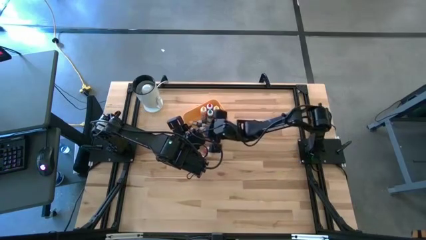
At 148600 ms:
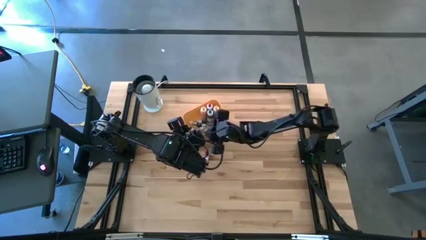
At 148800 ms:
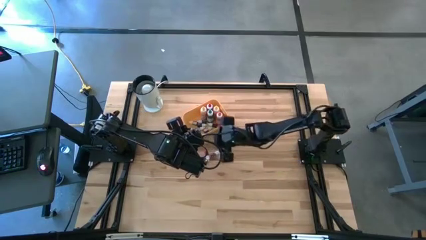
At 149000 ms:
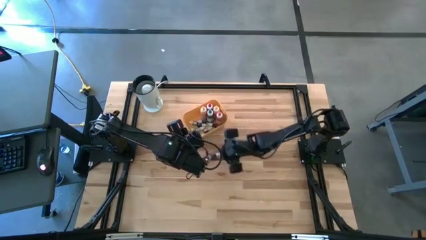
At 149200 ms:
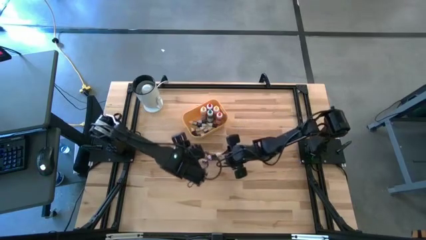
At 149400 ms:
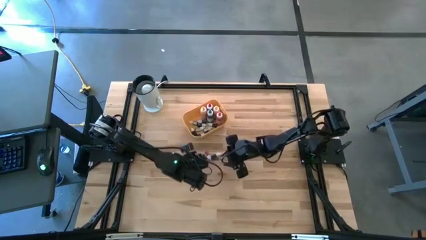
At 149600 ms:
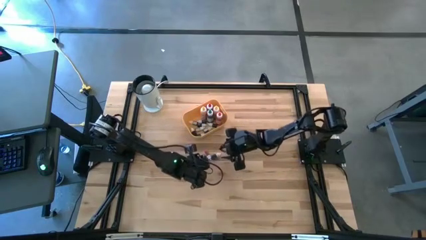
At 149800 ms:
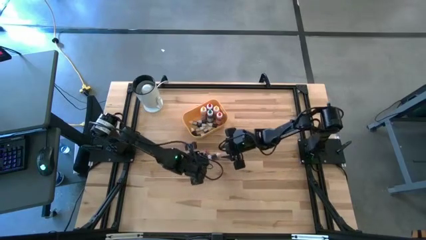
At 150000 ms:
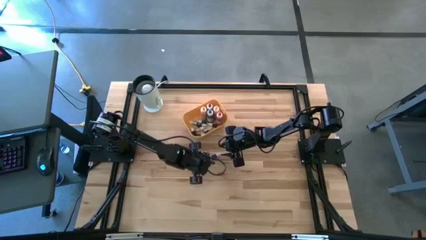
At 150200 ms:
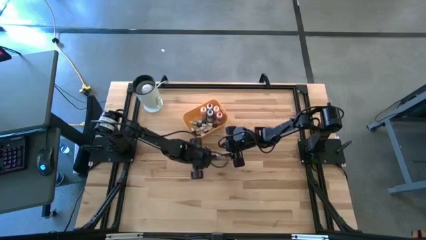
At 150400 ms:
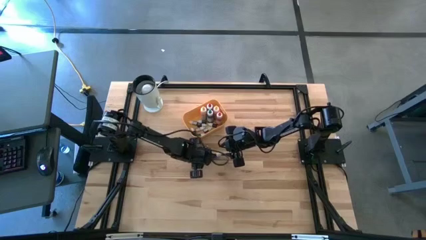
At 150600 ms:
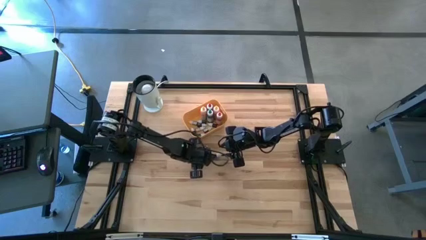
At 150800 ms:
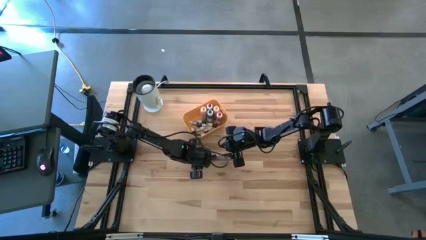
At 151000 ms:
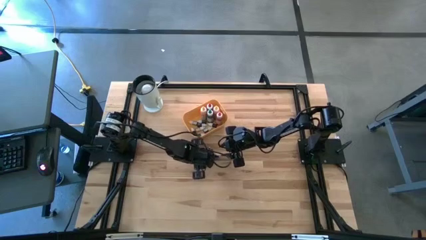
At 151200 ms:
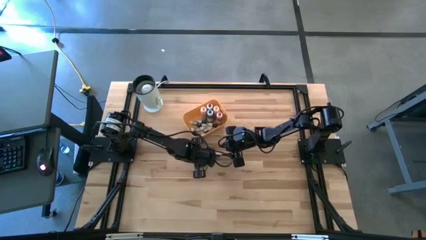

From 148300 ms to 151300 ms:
Task: Pick & Place food coloring
Put the small red food coloring bottle into the yellow bin

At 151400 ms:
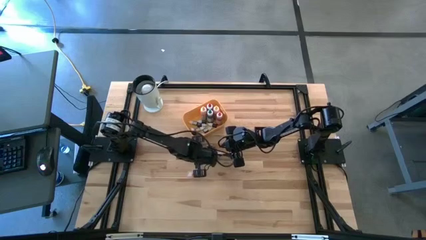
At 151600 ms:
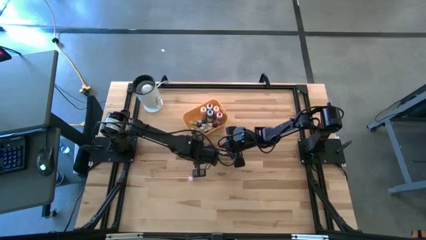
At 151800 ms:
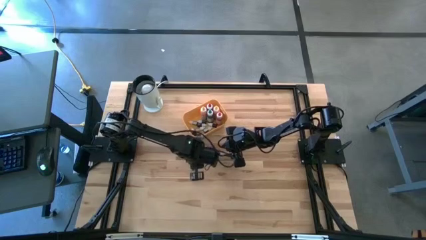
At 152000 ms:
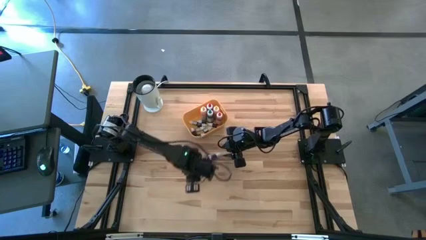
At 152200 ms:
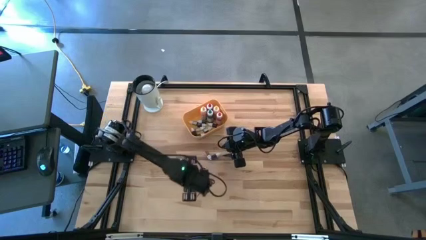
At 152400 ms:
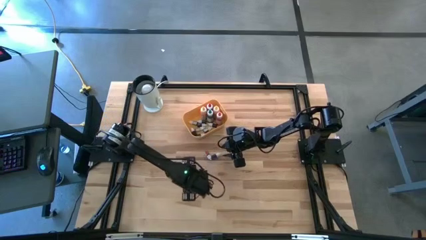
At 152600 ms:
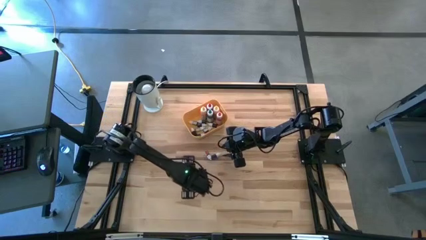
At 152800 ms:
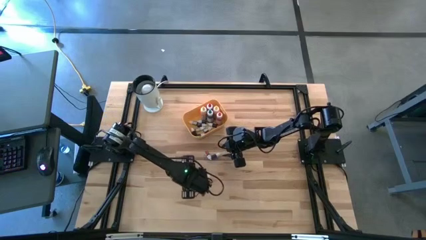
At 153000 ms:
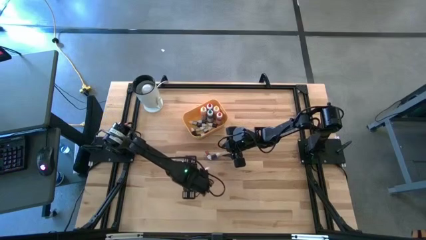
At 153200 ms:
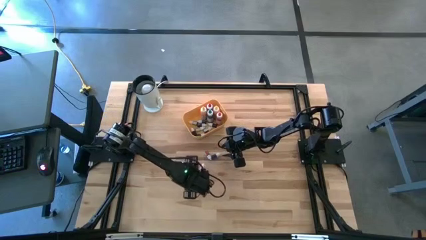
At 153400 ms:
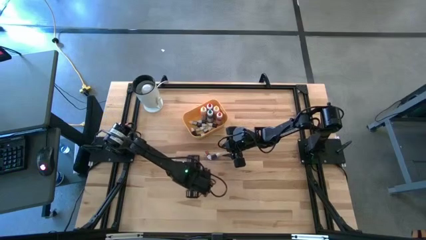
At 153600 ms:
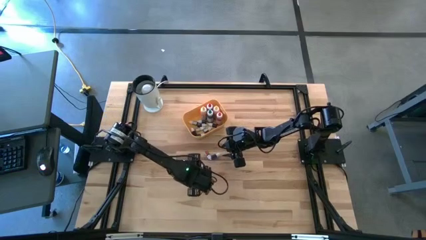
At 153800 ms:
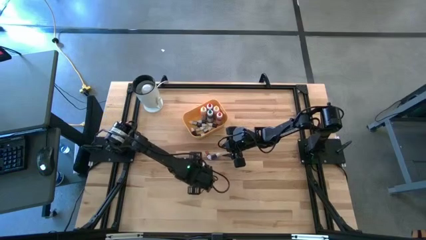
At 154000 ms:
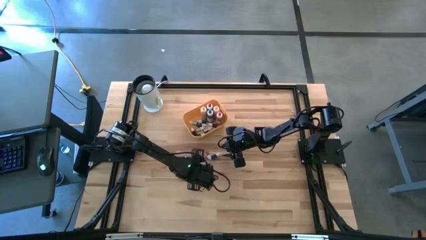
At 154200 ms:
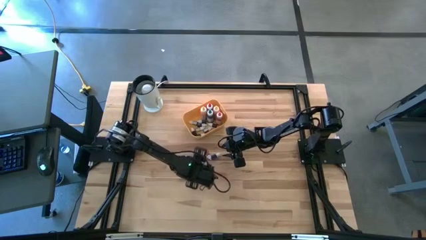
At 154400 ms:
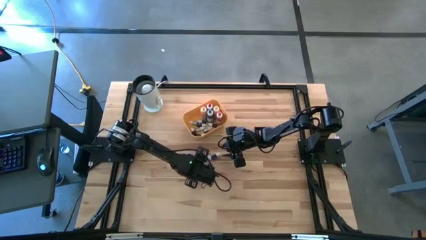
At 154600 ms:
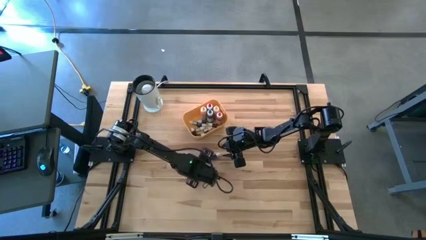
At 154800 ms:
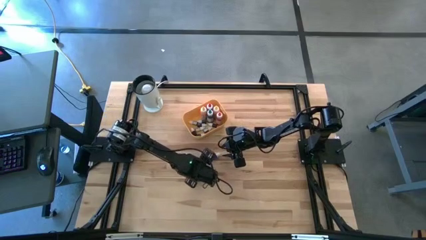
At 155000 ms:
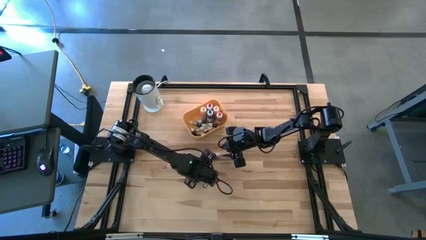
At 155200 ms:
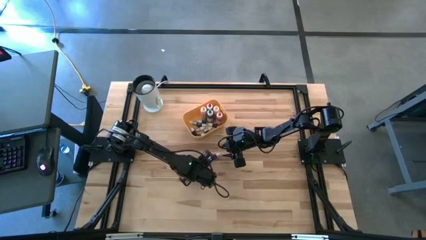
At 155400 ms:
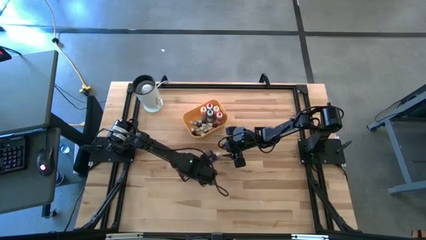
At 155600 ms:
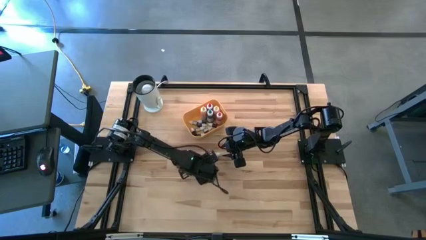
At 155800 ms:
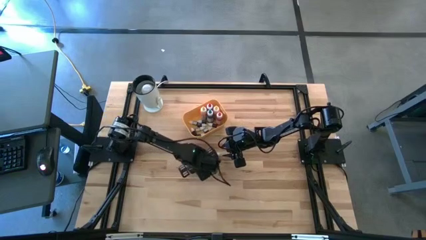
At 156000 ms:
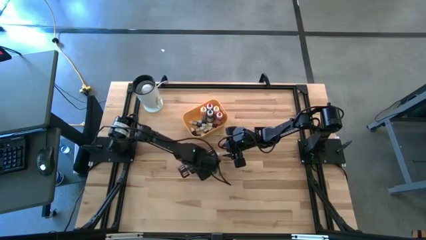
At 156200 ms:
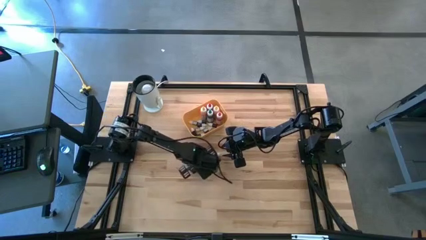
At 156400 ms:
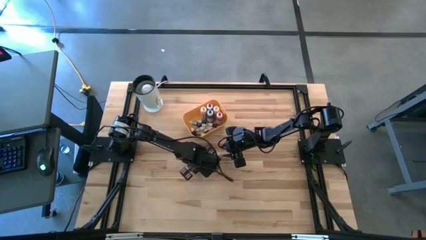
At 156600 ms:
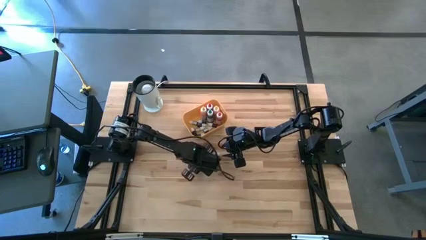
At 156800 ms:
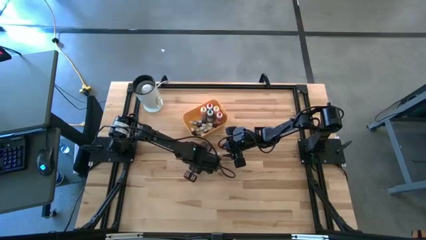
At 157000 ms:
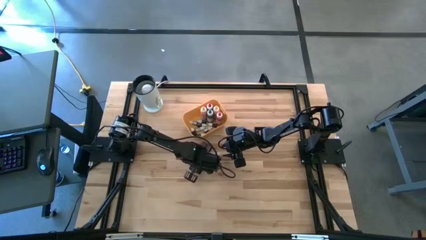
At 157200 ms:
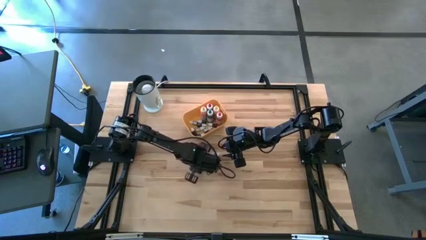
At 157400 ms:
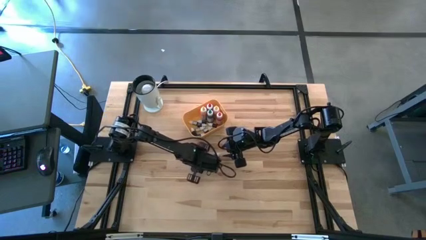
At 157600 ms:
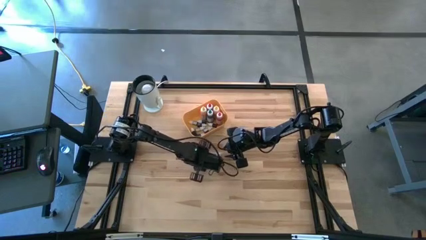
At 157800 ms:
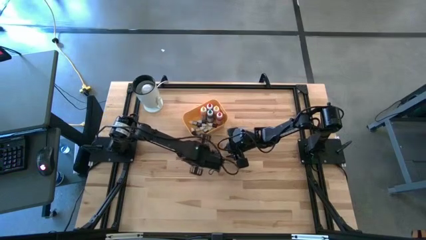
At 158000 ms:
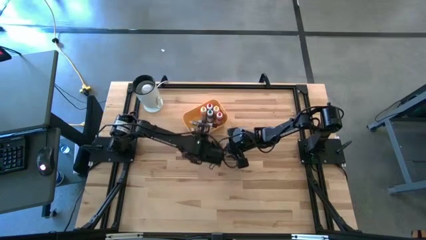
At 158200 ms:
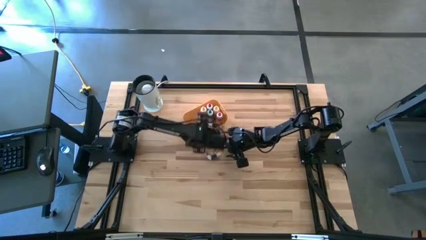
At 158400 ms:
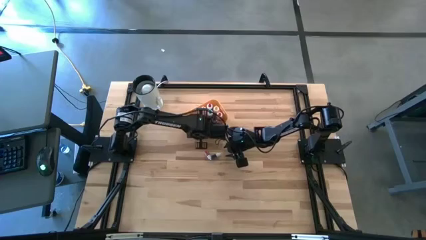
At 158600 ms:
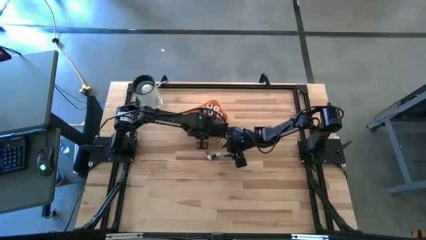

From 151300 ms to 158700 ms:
Put the small red food coloring bottle into the yellow bin

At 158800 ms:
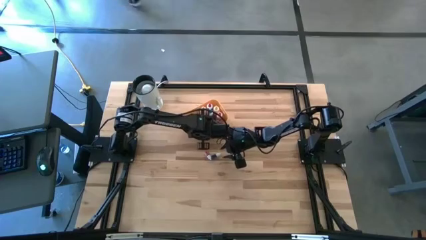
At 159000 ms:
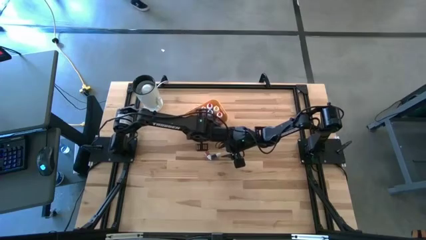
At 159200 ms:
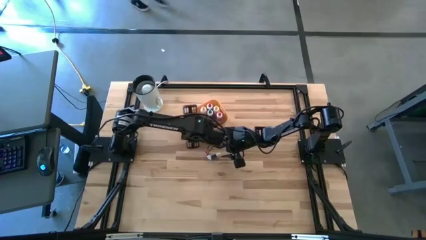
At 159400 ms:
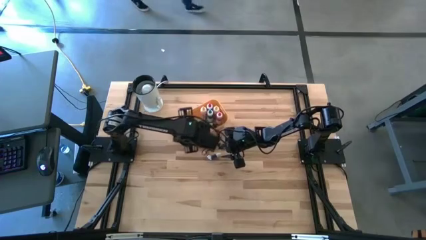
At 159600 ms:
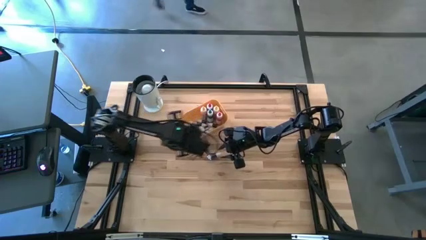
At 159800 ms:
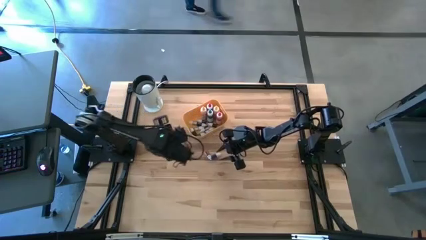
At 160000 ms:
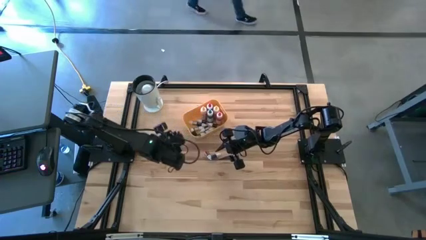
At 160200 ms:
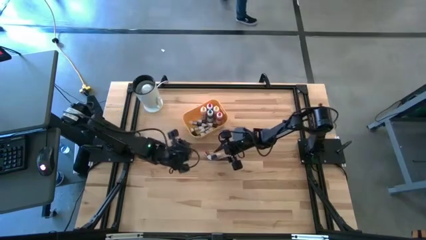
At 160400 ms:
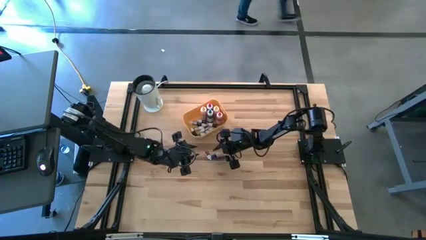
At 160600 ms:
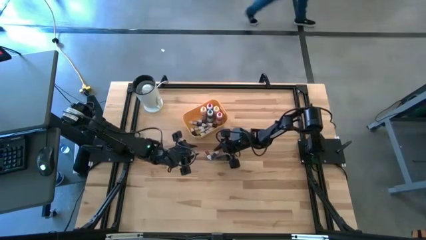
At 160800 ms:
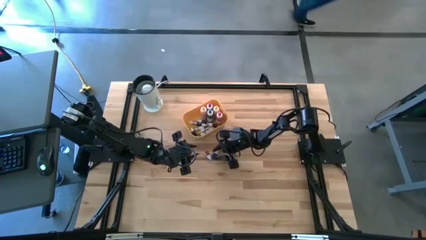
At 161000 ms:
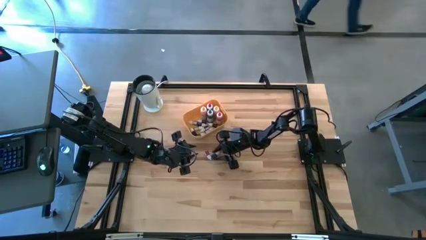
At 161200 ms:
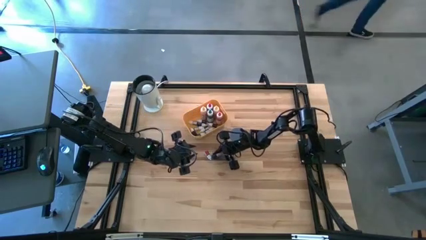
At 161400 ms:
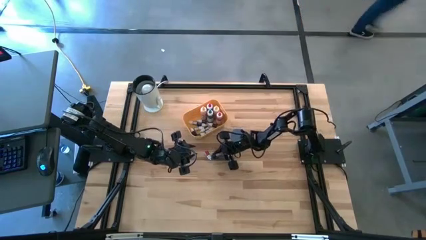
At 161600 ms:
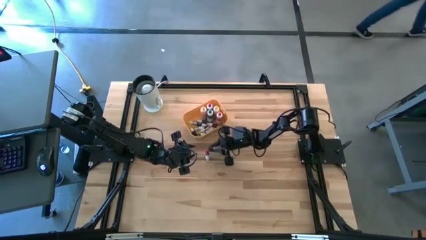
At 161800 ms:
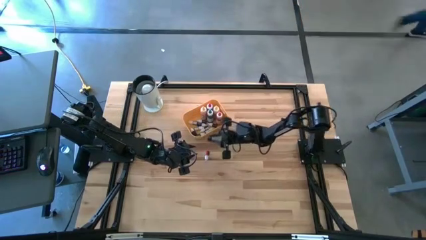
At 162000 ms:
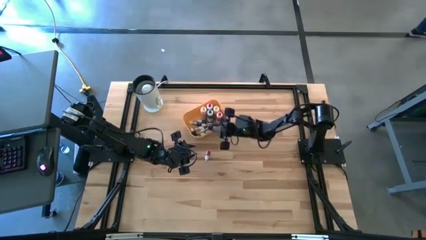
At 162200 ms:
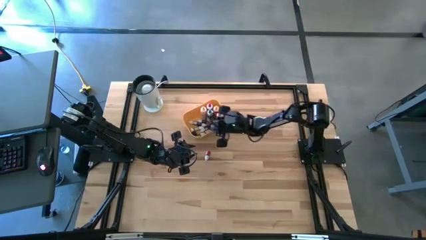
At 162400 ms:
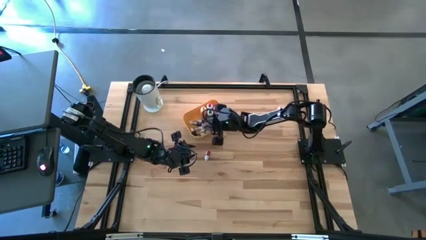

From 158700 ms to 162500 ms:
Put the small purple food coloring bottle into the yellow bin

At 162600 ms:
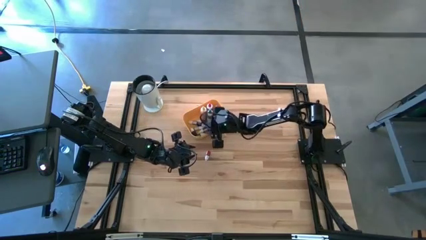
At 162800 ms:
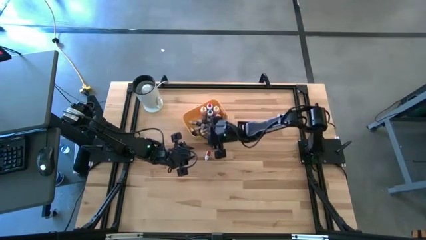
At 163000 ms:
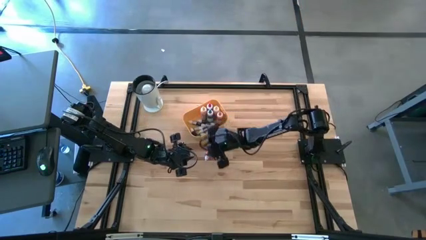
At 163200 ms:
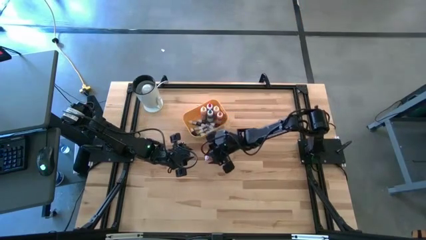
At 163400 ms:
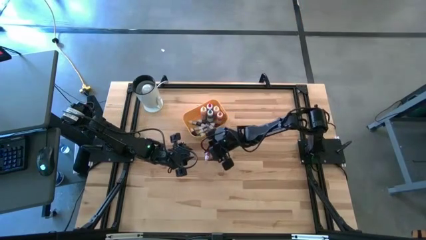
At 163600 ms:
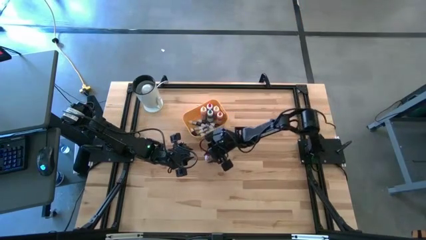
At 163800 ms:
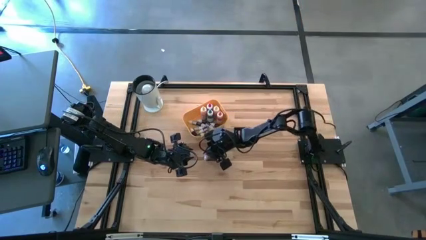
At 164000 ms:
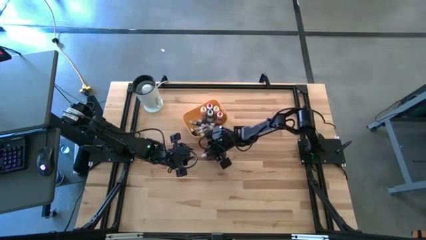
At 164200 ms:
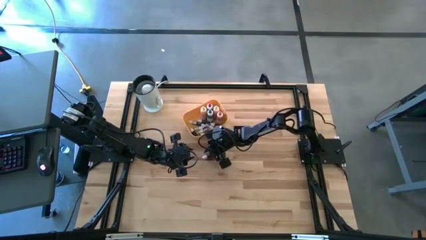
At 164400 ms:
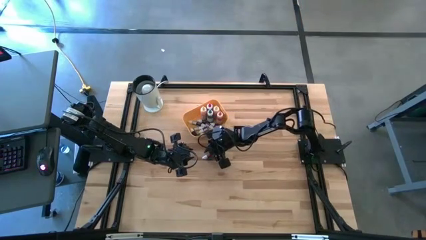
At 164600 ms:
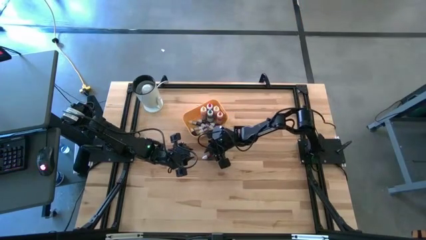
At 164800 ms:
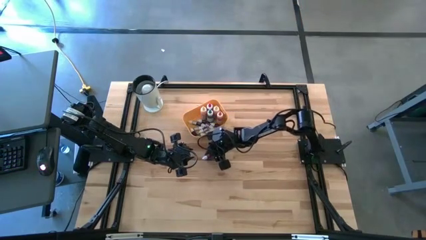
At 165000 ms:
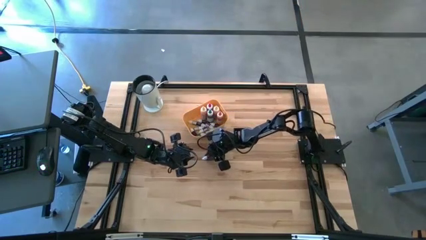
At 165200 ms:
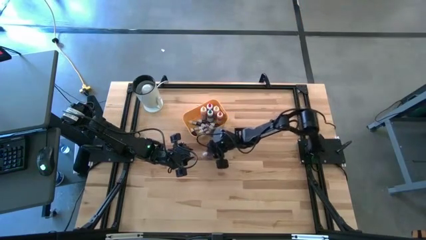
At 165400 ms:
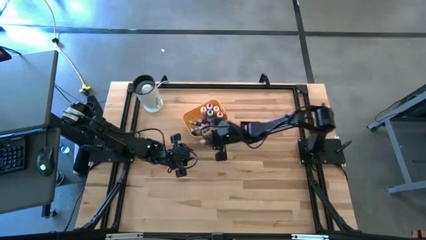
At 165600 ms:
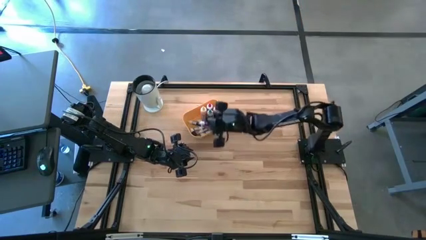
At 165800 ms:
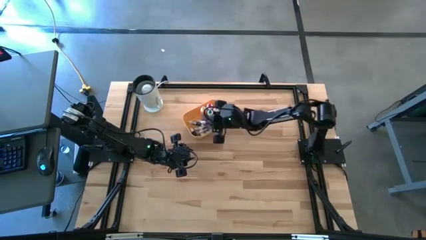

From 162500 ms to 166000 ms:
Put the small red food coloring bottle into the yellow bin
